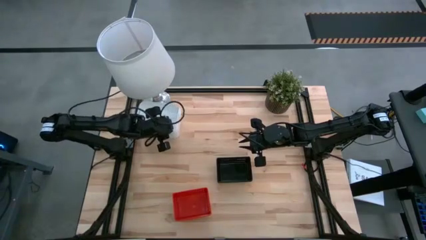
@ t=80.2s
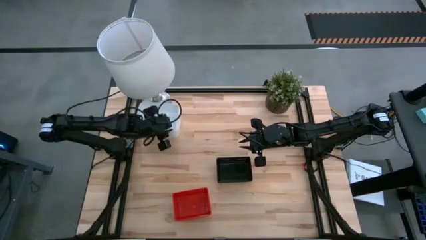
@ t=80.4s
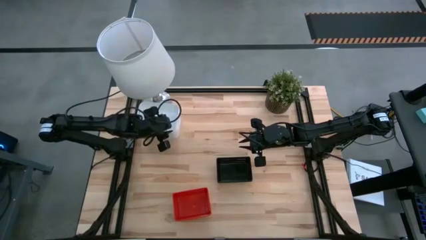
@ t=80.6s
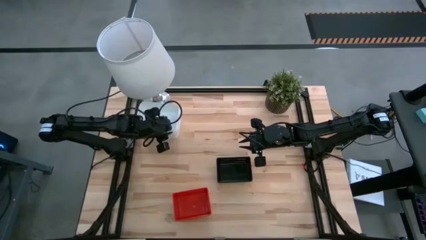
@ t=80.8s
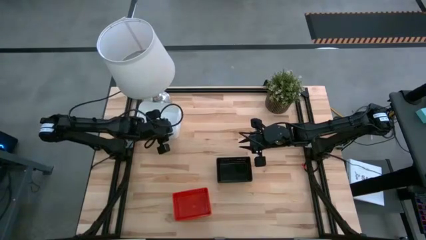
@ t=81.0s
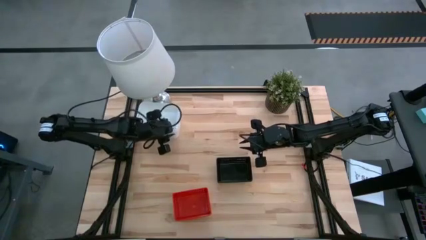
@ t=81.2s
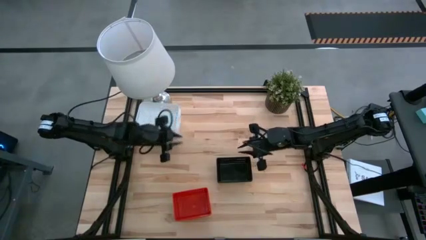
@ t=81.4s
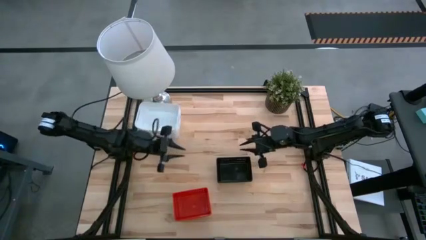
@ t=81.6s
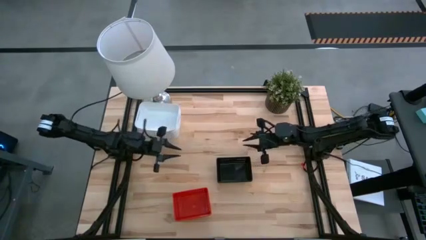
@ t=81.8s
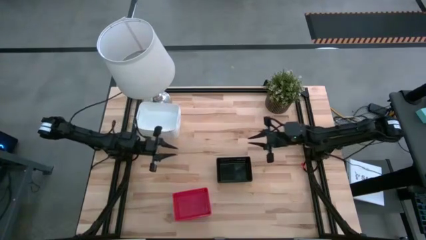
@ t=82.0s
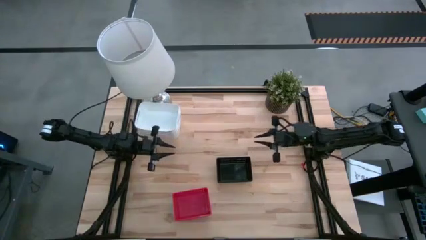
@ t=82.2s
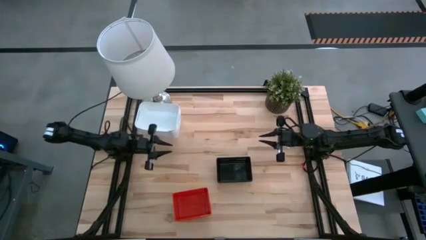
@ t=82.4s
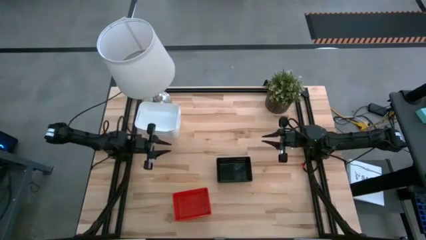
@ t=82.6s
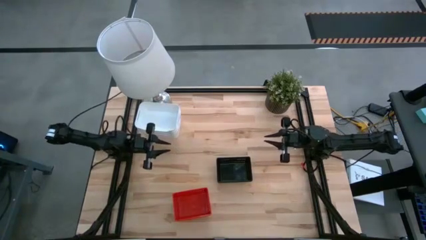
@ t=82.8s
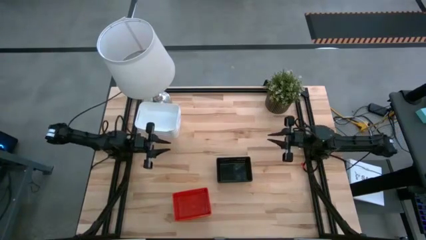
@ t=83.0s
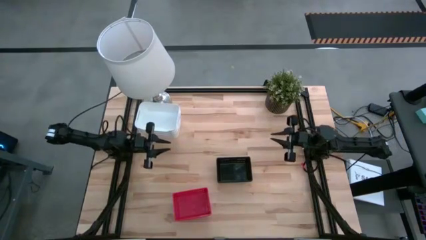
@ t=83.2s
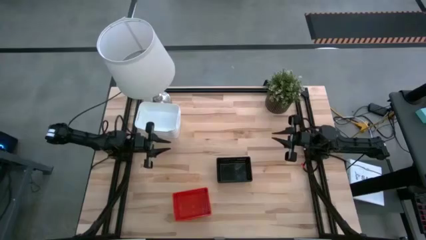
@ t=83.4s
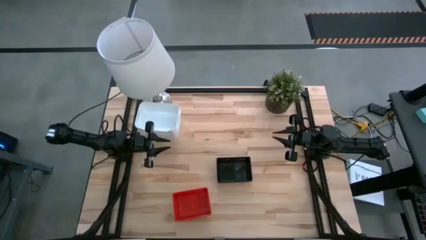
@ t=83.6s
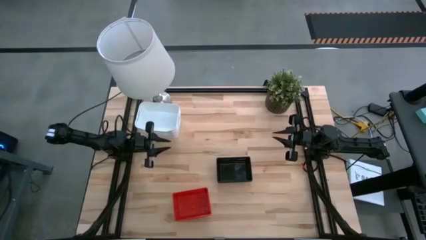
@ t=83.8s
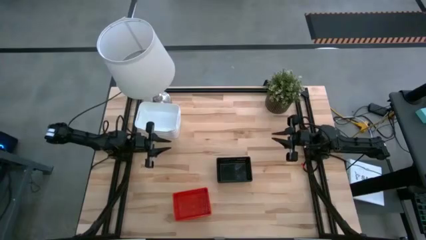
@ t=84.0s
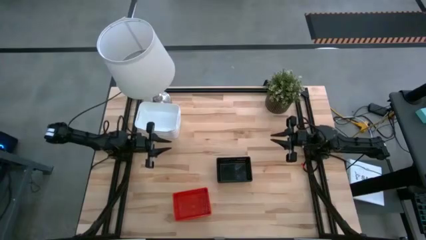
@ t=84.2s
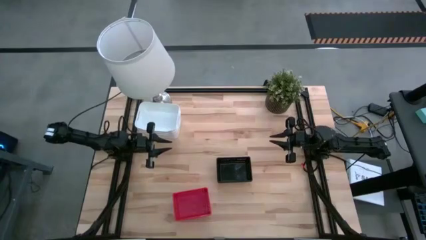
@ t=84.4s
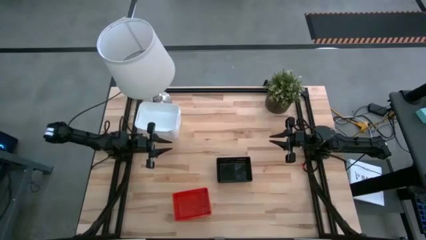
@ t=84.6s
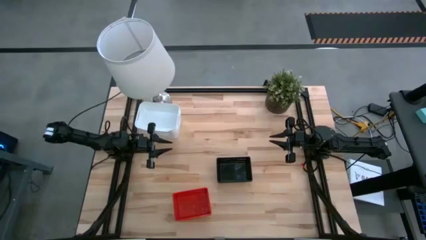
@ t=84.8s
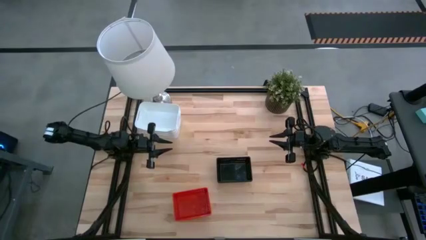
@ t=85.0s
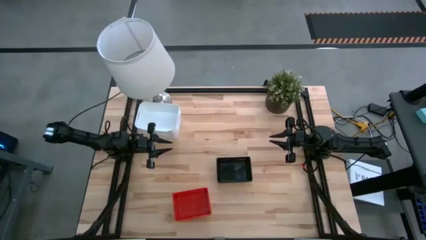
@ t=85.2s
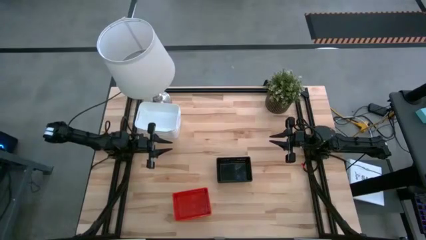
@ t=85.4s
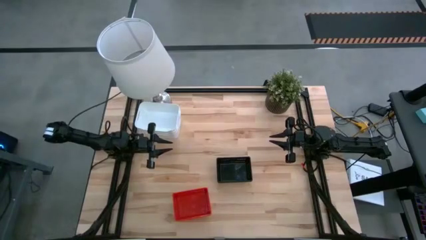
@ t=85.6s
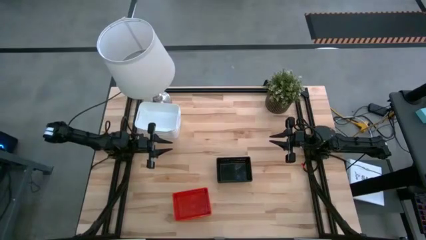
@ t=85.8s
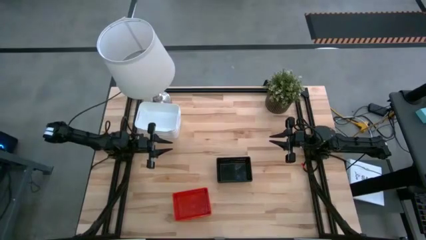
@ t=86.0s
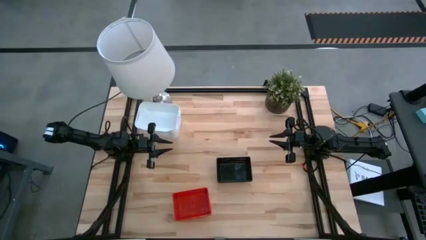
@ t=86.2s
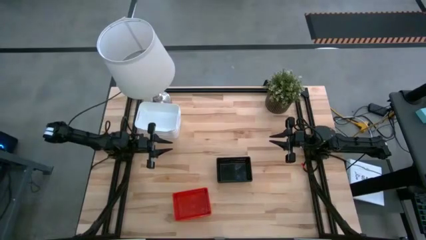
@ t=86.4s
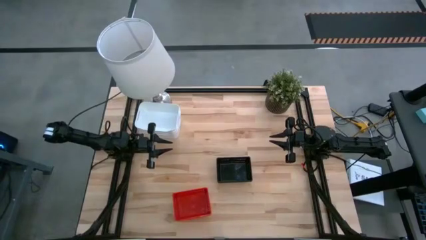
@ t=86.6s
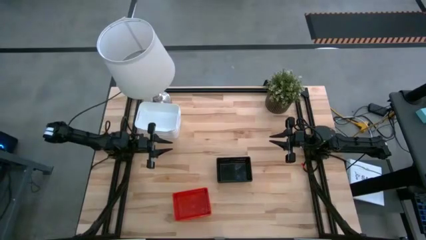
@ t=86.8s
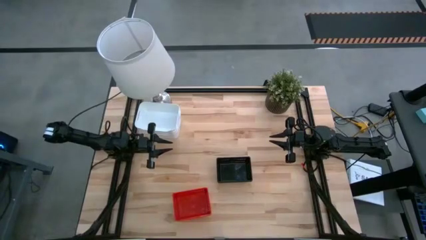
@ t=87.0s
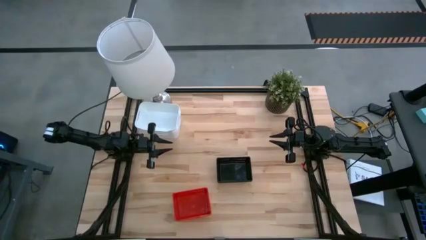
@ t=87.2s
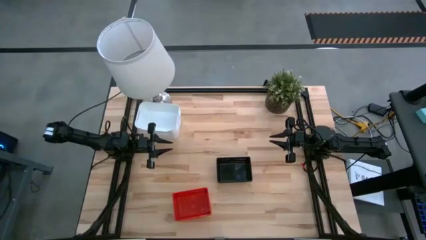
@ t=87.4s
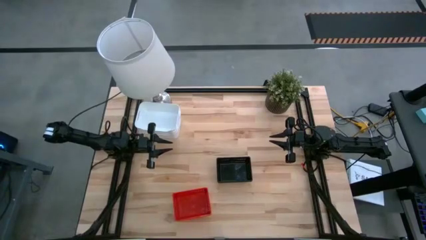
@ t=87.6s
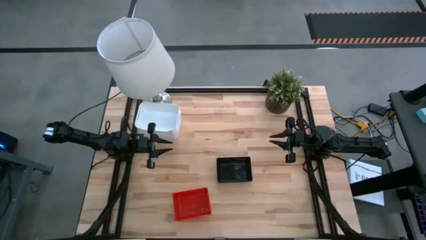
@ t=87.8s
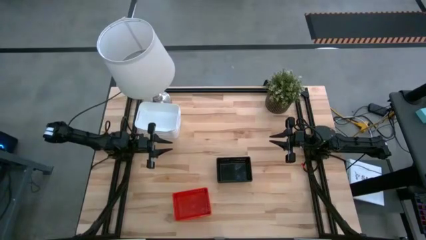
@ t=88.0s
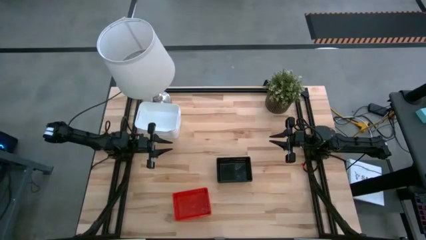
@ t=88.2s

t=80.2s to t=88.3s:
Return to Home Position
